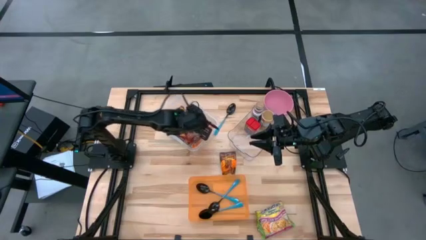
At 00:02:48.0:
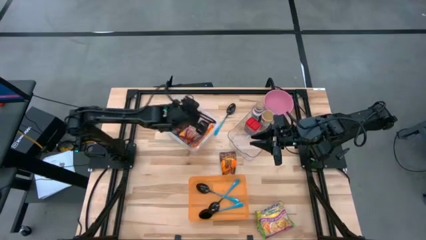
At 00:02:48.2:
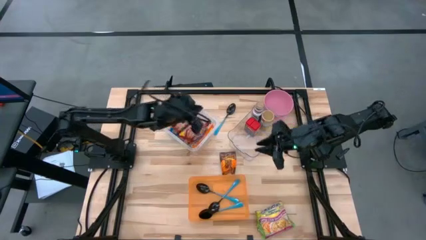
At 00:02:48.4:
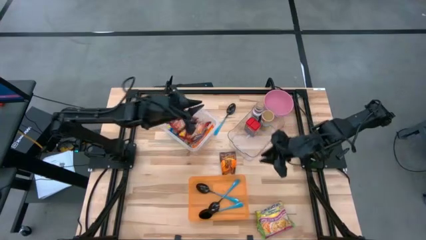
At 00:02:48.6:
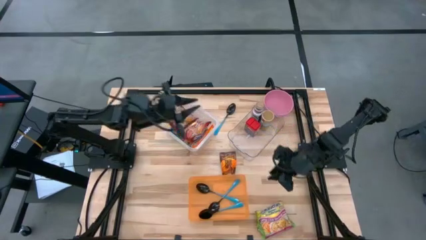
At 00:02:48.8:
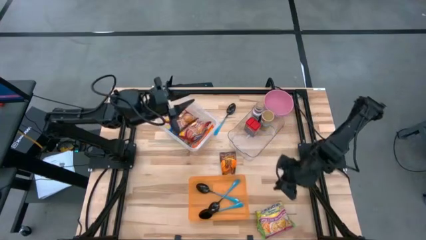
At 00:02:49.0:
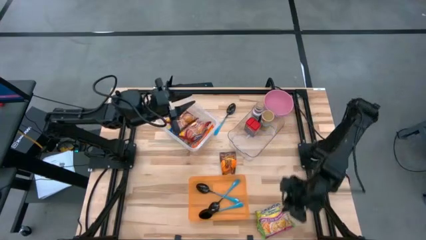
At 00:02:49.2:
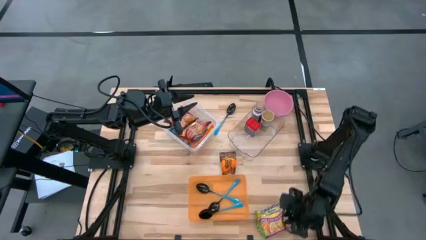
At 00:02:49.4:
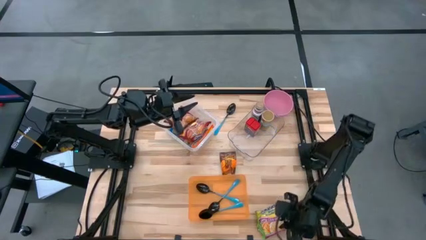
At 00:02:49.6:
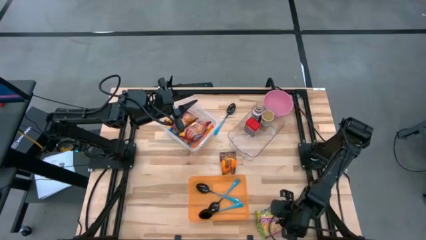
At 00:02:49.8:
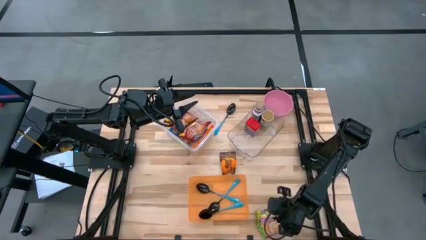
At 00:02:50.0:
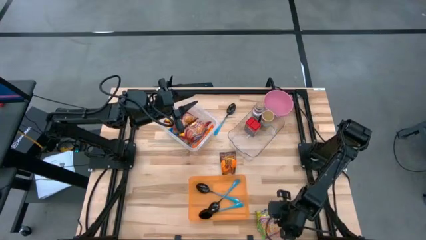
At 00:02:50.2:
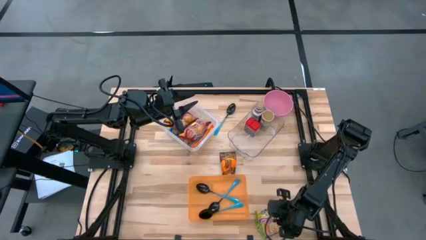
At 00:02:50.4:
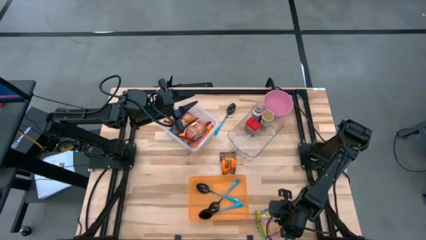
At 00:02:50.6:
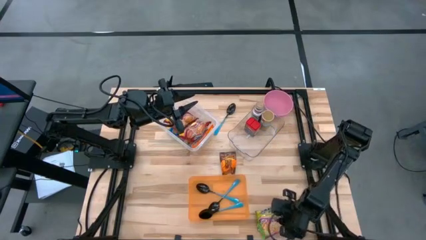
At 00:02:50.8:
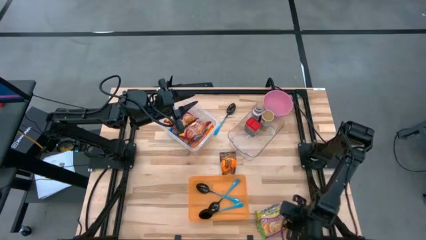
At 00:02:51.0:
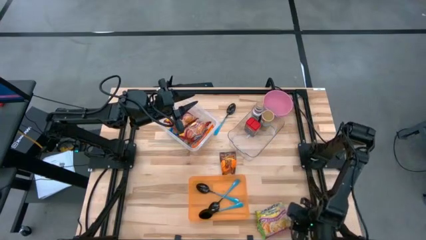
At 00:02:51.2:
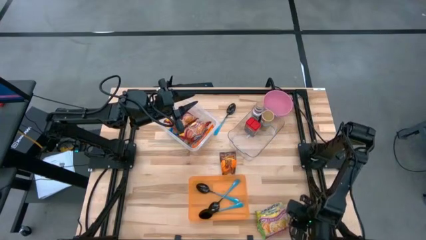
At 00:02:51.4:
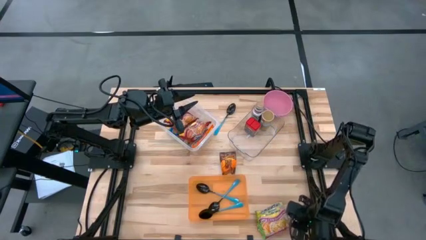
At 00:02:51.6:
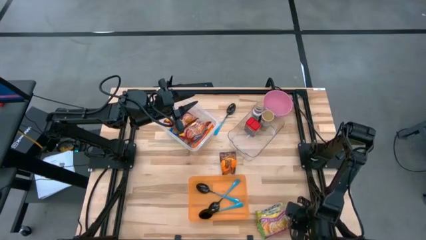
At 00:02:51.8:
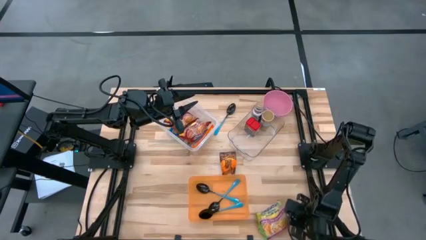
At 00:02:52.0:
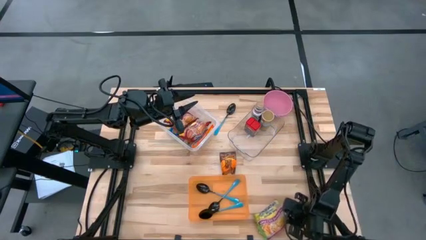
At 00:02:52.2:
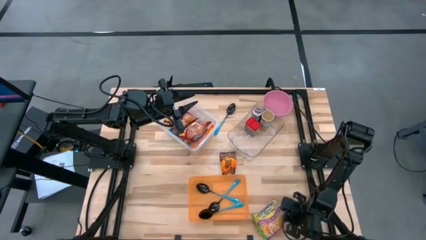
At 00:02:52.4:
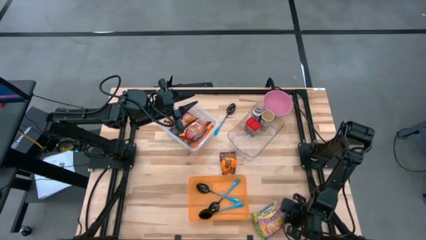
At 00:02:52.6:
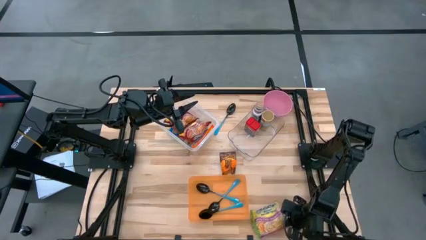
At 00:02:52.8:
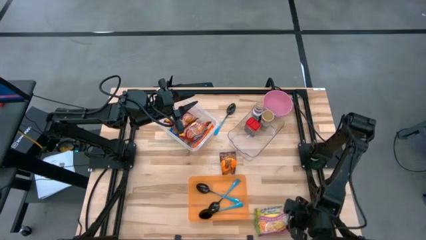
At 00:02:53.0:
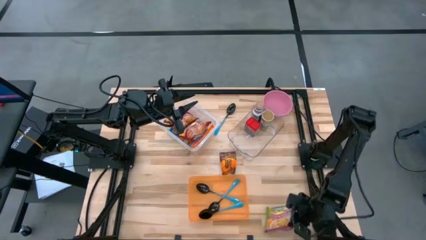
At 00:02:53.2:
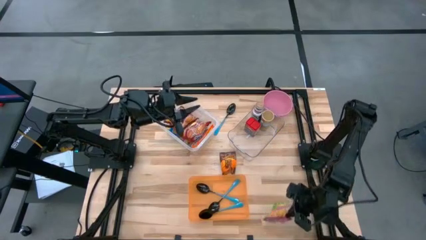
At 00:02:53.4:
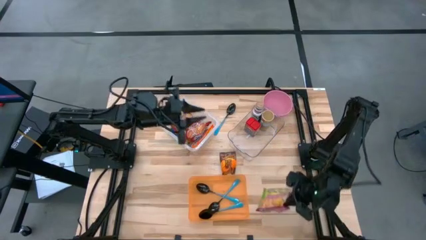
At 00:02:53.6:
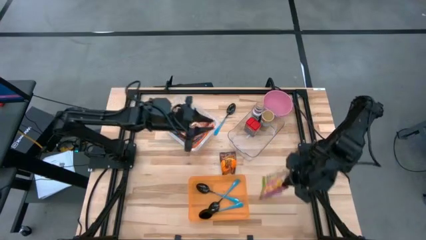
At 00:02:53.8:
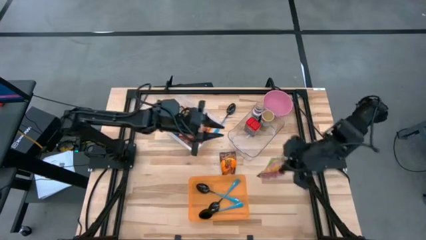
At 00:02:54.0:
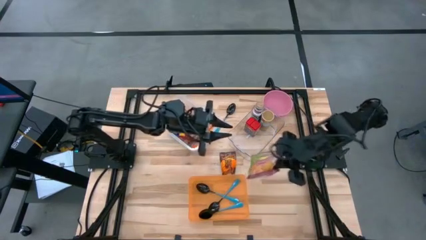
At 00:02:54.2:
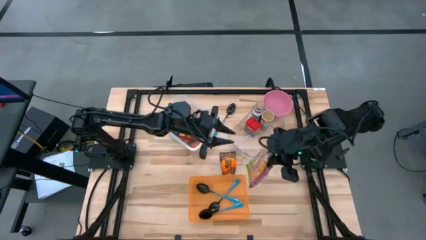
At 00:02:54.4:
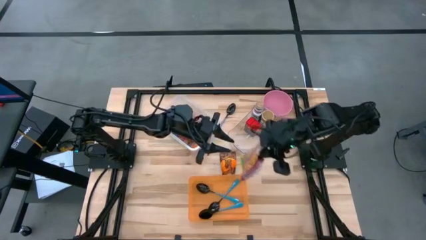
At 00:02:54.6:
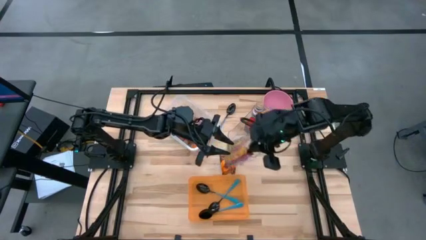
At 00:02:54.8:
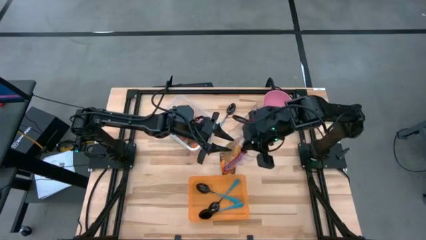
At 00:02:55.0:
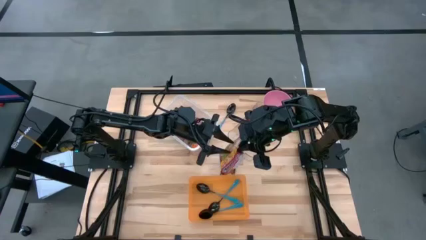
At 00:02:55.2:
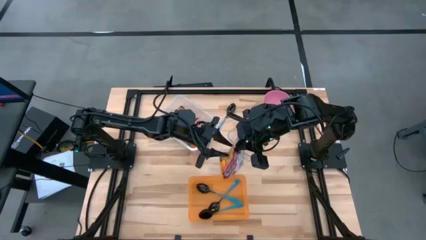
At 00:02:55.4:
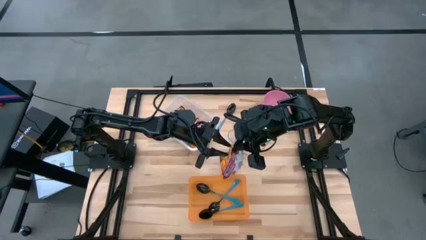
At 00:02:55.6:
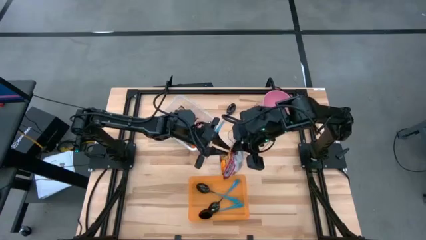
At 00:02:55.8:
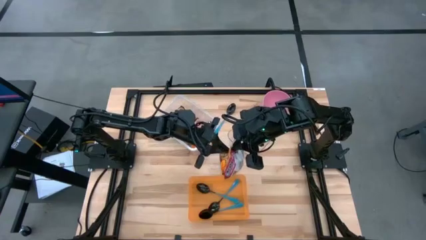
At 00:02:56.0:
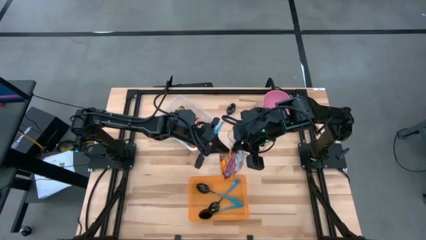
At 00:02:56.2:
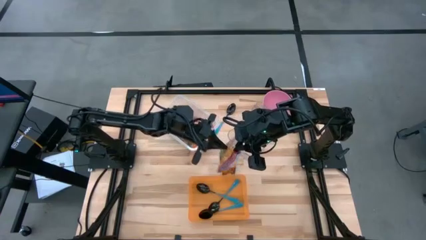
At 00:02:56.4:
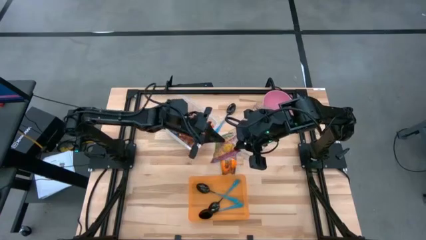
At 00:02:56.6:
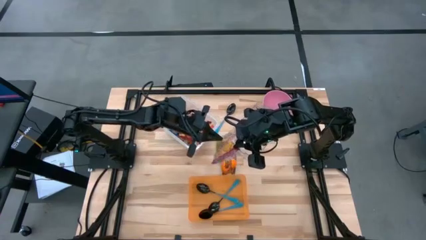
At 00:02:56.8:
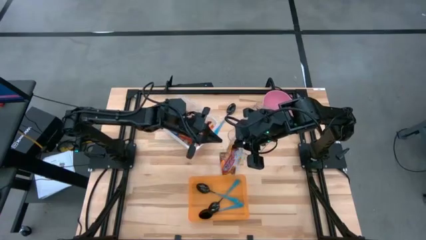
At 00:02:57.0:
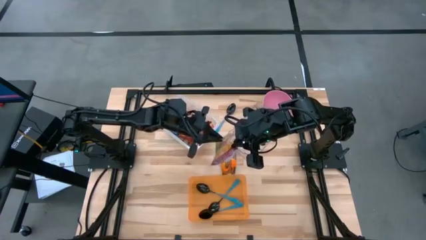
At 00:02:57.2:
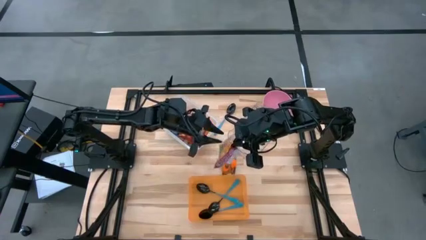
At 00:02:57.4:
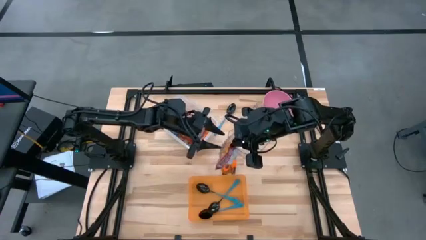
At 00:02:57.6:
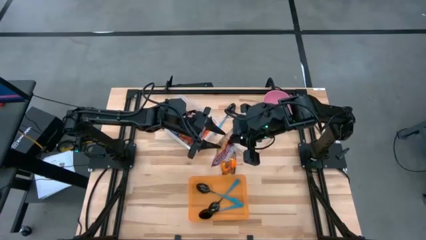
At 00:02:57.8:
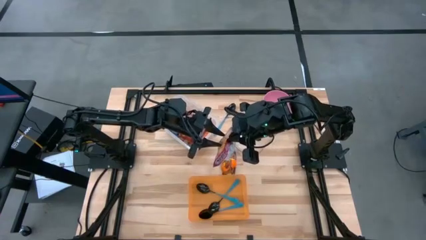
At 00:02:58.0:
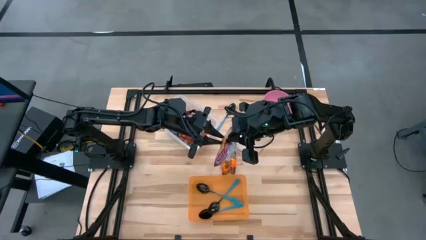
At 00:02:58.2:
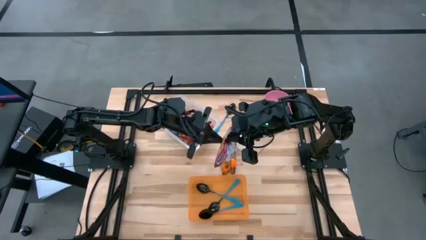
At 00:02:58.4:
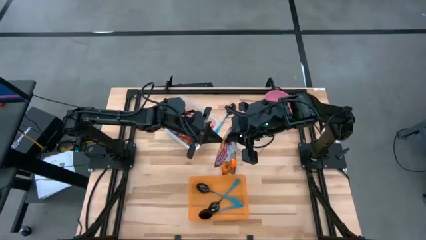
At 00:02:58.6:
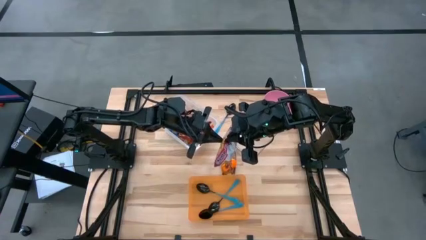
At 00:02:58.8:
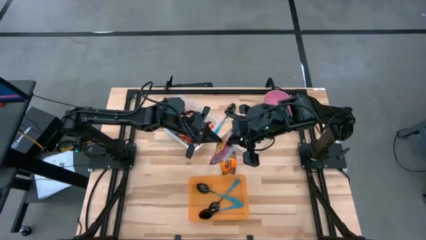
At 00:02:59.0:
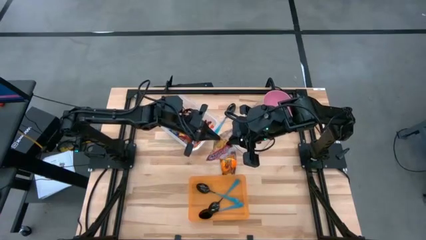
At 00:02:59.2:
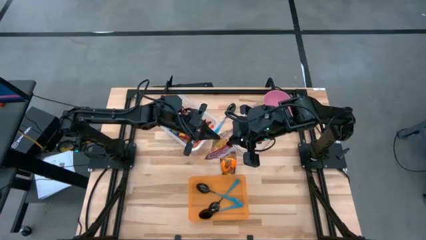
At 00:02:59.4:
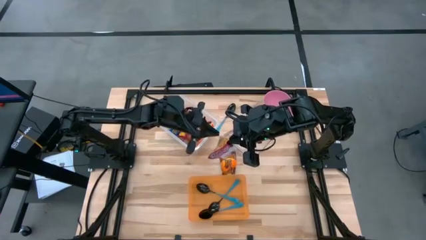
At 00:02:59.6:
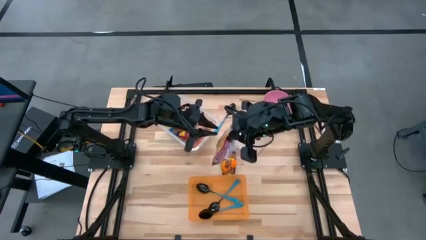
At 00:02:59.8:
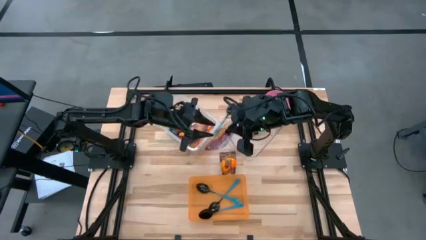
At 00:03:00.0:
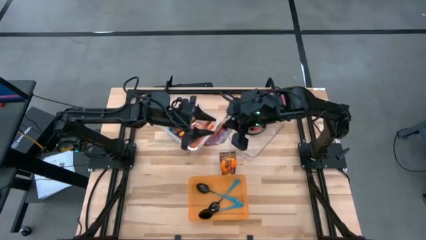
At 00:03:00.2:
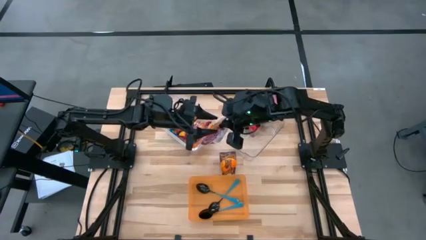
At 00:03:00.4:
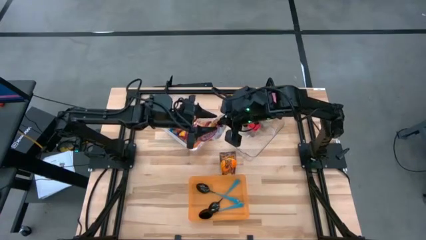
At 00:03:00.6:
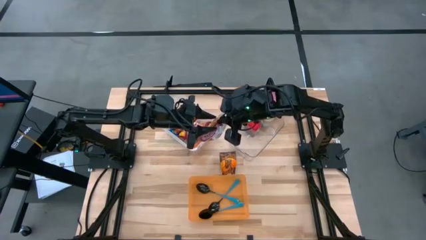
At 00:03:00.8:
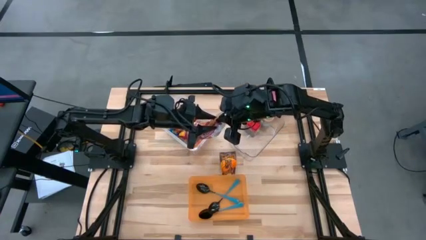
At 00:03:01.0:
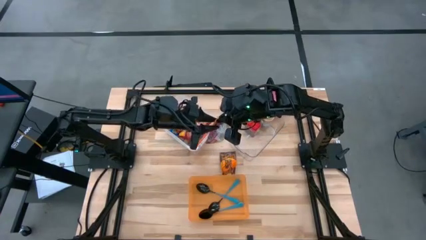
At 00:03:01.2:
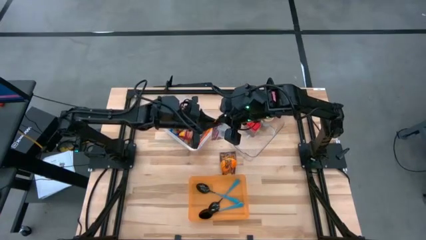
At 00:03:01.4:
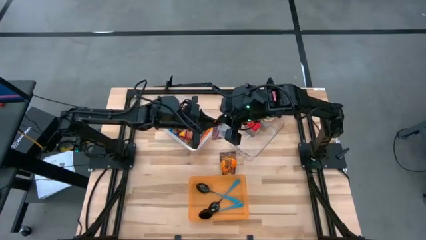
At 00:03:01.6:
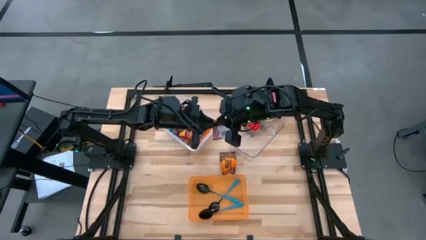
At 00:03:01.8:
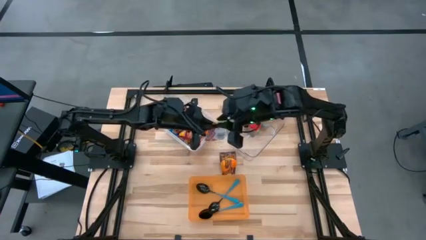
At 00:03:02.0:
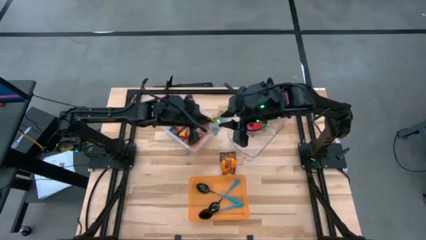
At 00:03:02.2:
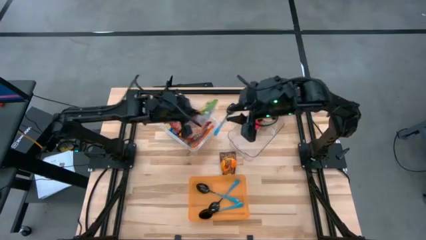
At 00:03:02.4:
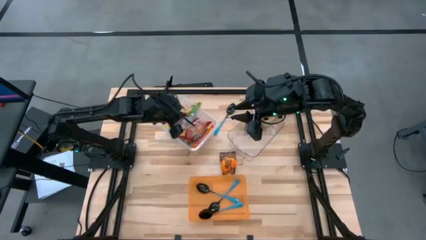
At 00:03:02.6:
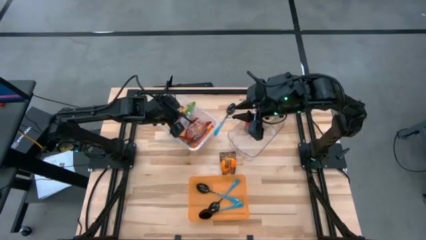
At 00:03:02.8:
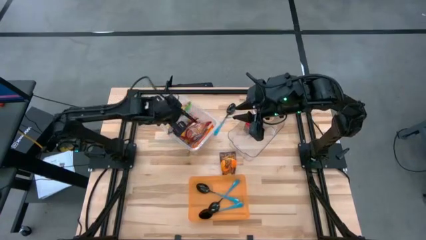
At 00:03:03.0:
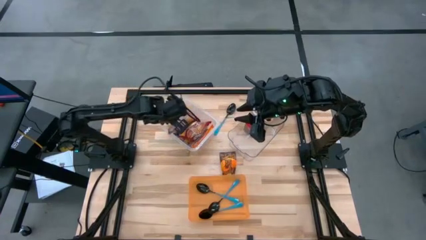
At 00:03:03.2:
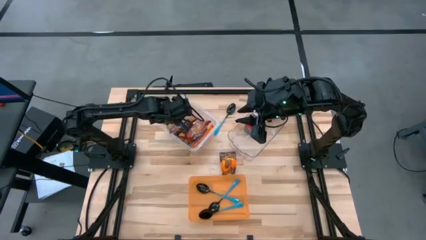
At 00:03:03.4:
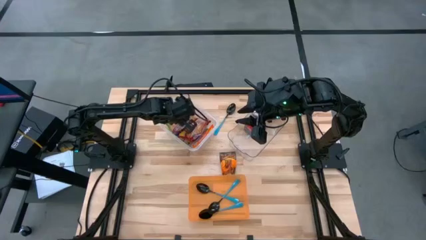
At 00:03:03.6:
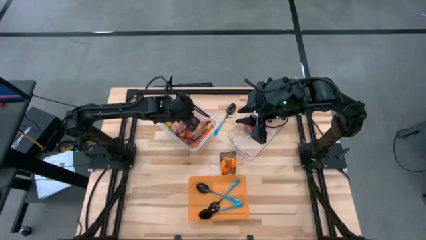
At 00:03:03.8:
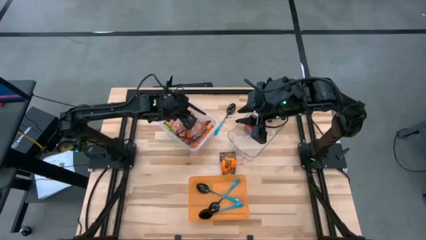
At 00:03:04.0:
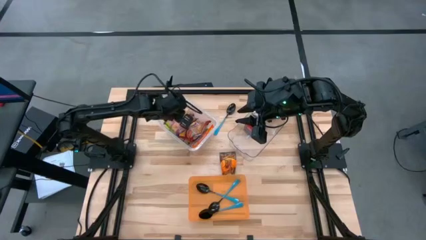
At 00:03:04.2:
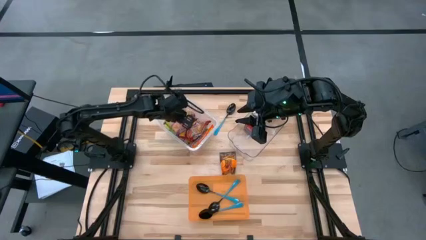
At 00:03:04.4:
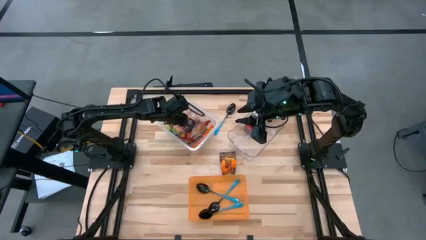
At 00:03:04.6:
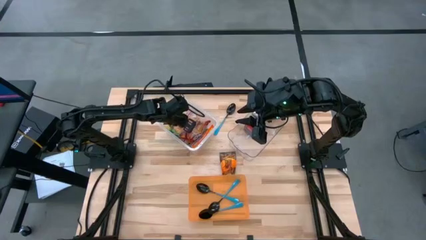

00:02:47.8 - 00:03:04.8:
Task: Pick & Place Food Item
Put the green noodle pack into the transparent container
